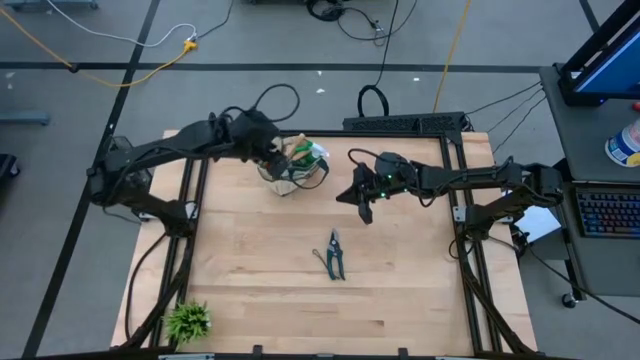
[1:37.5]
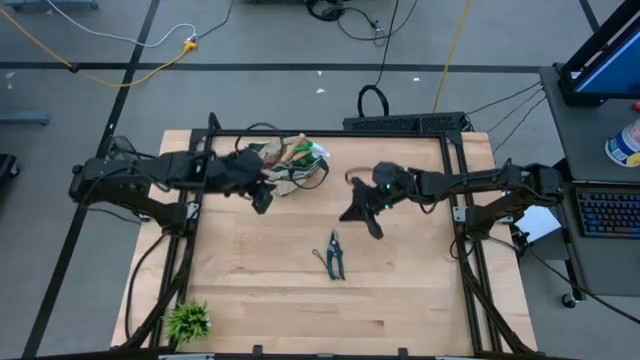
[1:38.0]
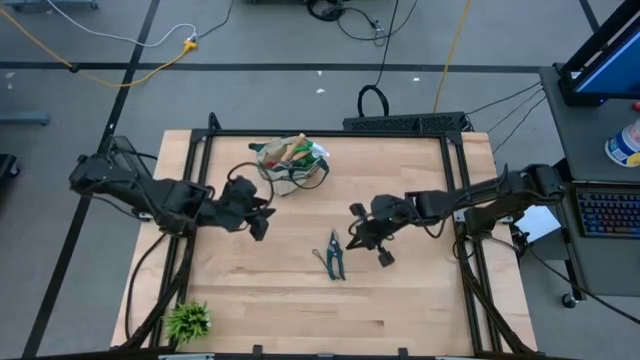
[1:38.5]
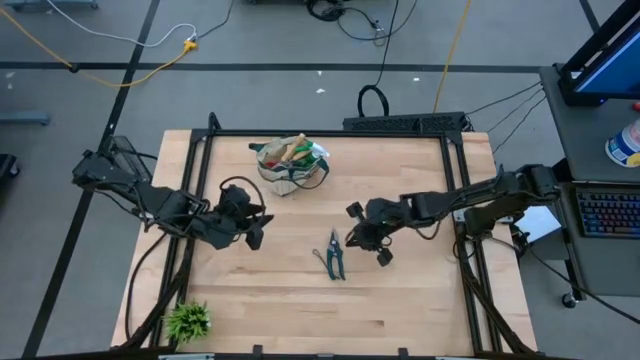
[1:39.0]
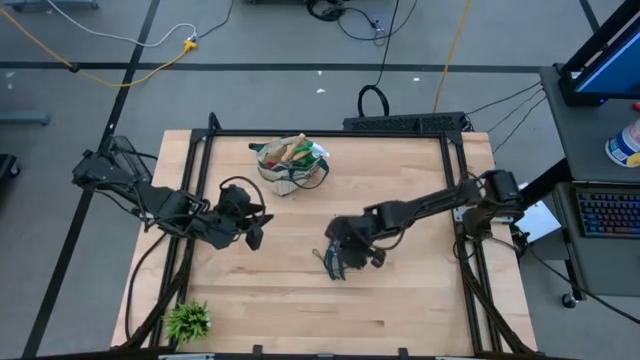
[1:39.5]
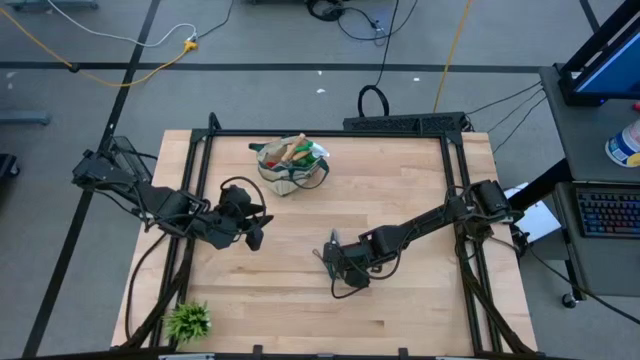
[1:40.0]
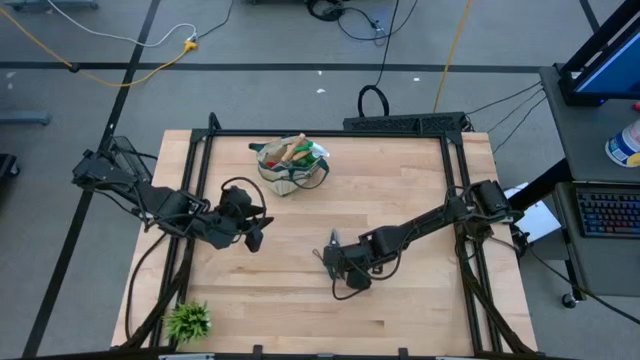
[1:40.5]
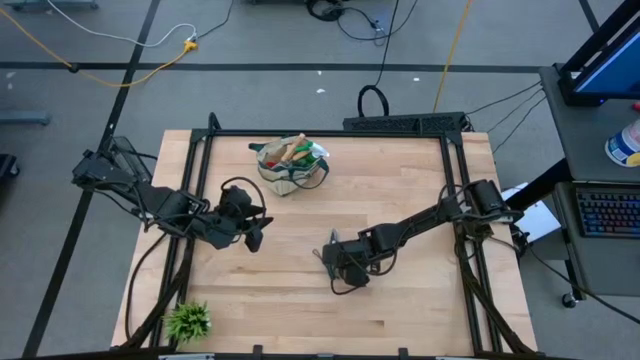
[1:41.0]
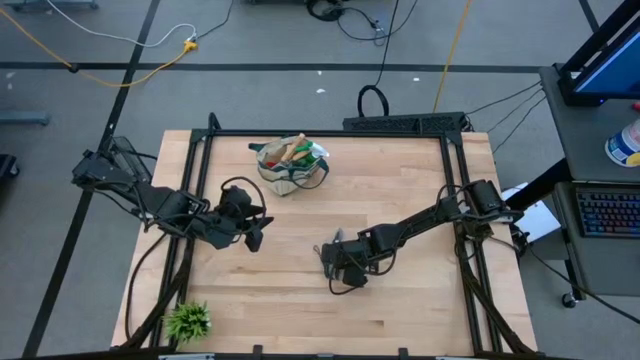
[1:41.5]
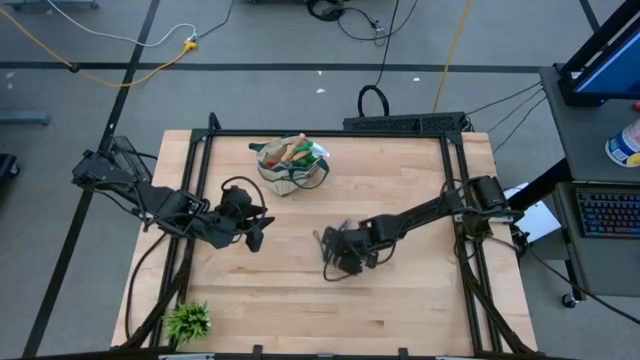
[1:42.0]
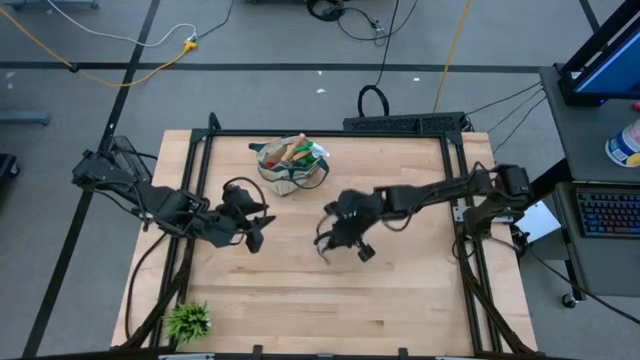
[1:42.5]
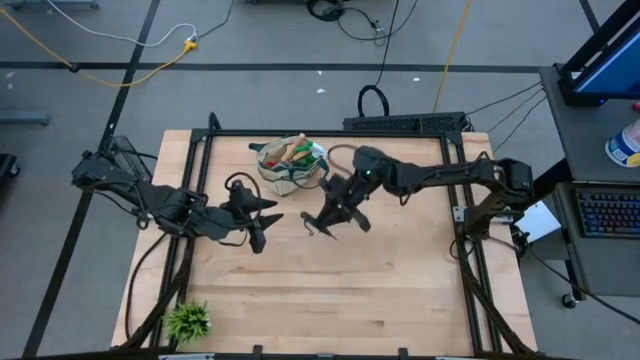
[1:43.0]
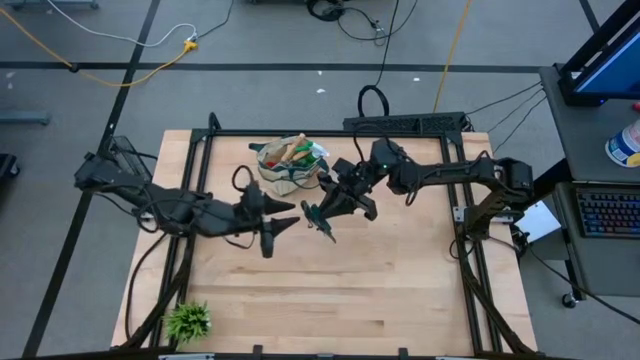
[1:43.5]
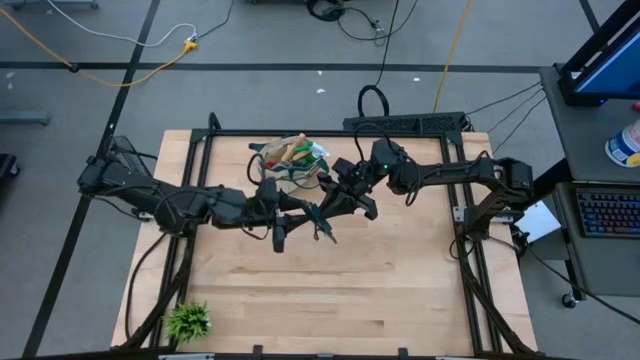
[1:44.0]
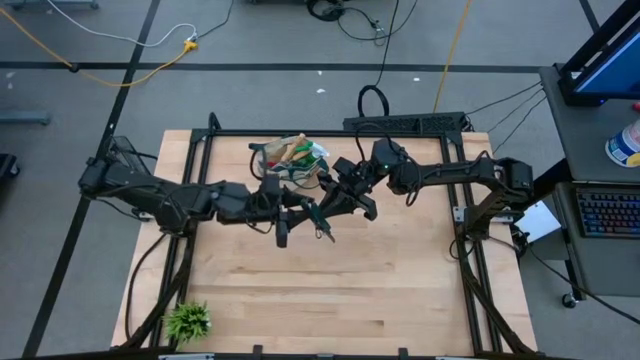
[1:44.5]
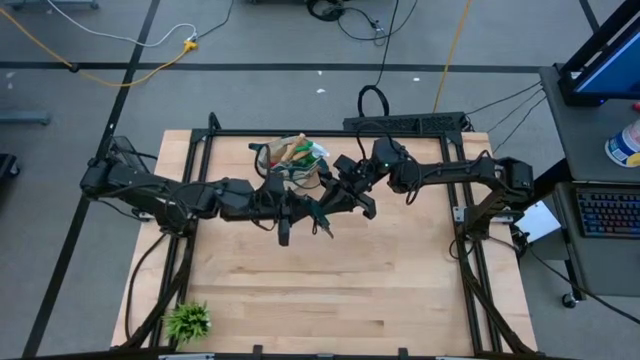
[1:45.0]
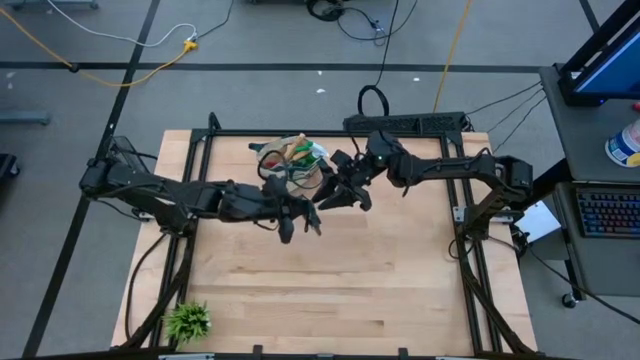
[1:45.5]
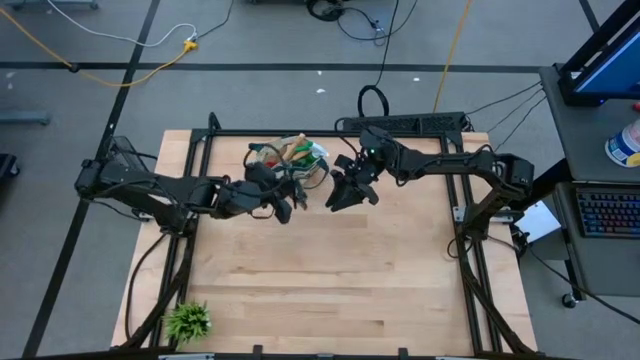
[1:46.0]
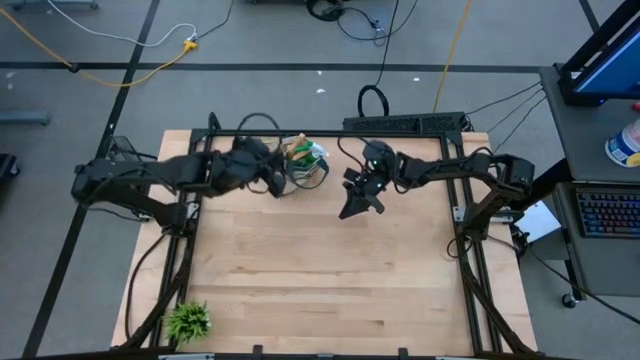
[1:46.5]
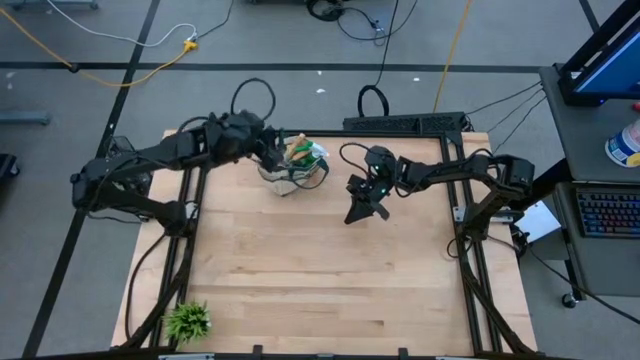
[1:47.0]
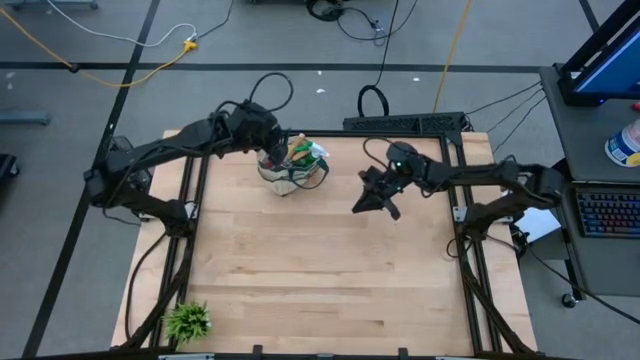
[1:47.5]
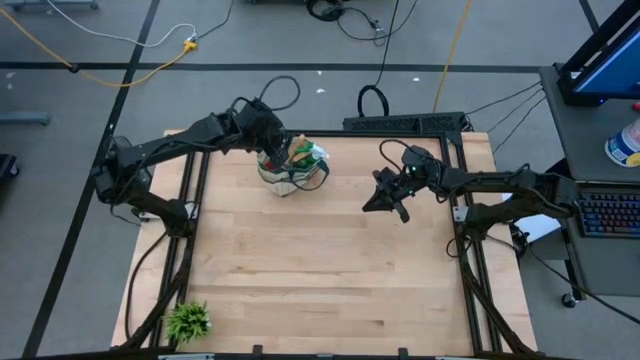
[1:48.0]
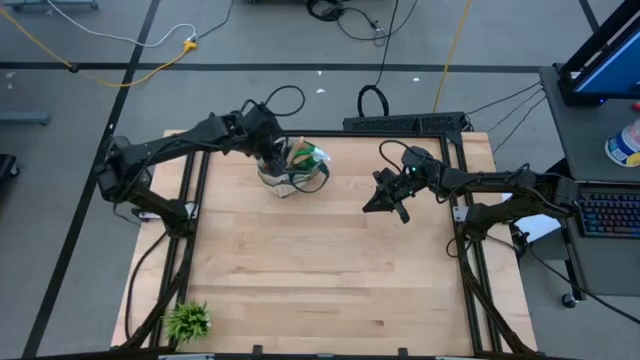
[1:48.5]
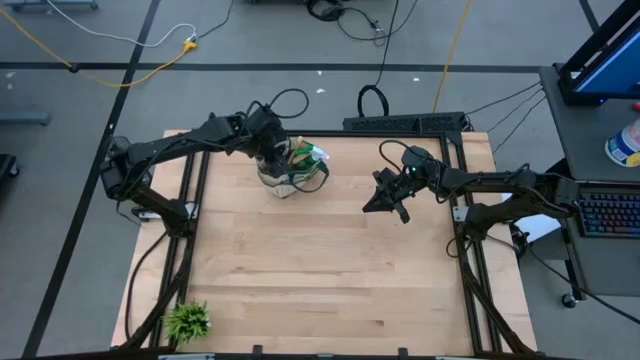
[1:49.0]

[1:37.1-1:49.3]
Task: Pick & Place Garden tools in Gardening bag
Put the shear scissors into the gardening bag

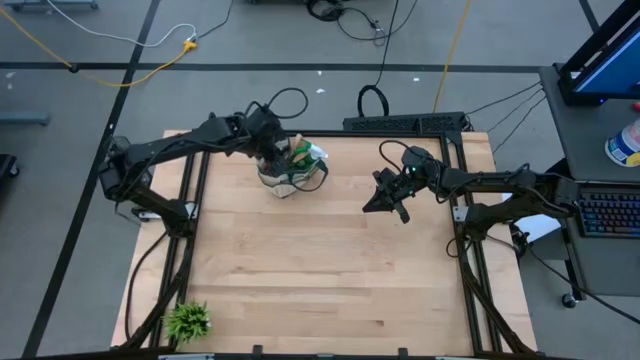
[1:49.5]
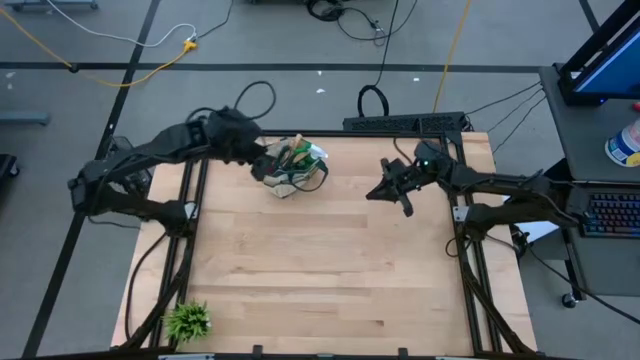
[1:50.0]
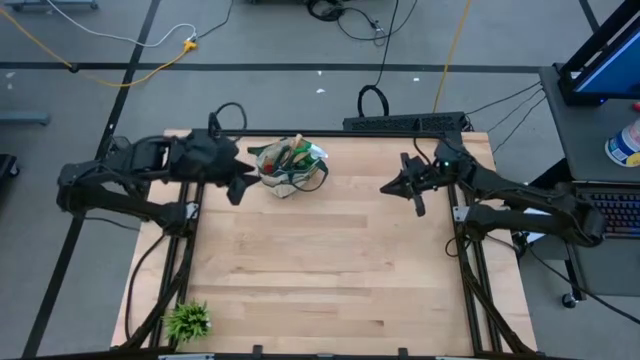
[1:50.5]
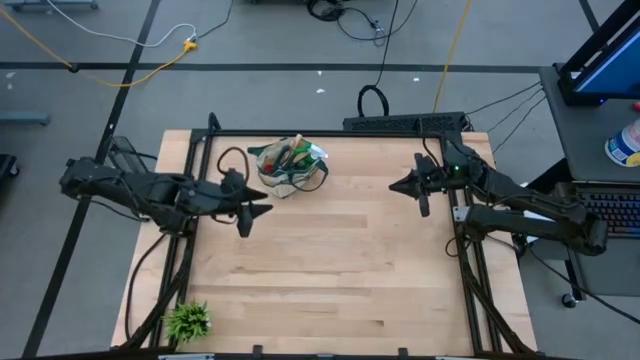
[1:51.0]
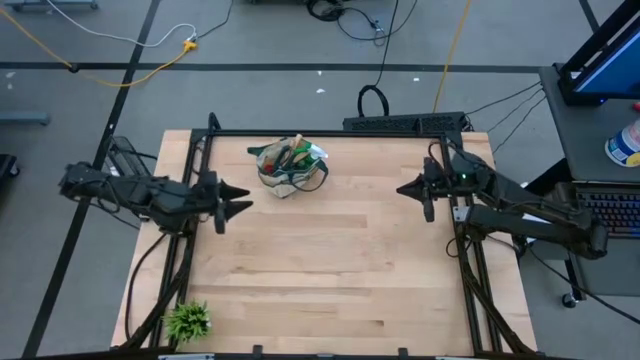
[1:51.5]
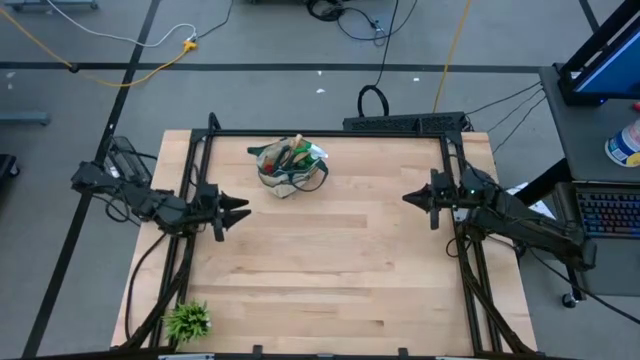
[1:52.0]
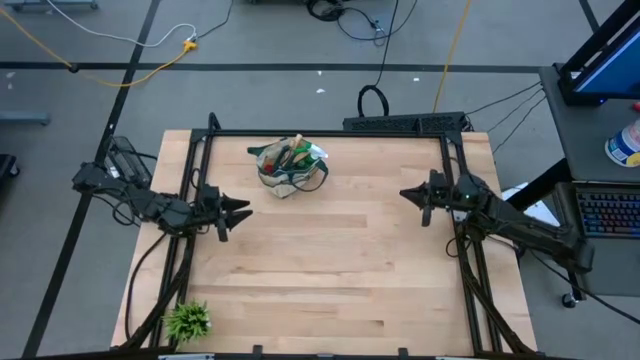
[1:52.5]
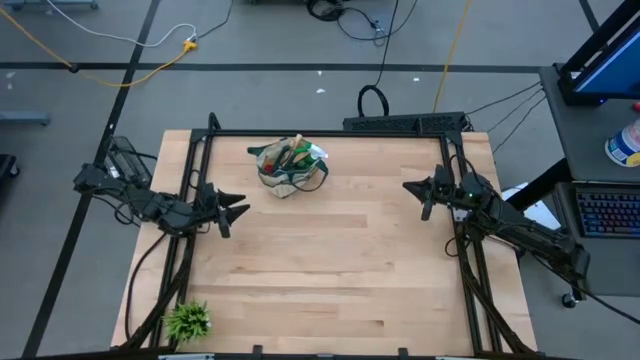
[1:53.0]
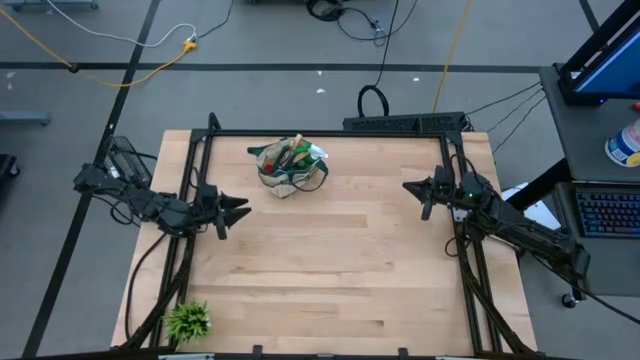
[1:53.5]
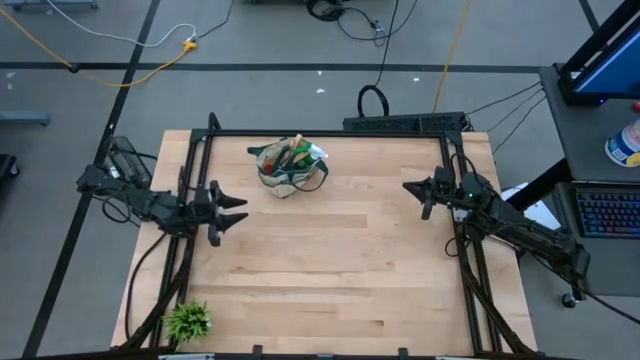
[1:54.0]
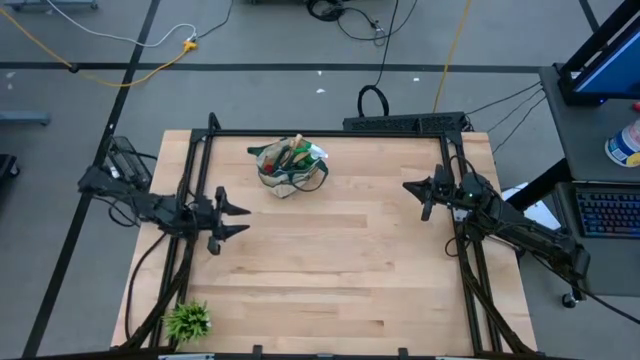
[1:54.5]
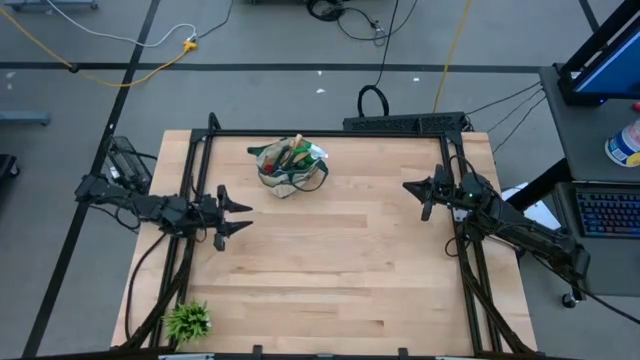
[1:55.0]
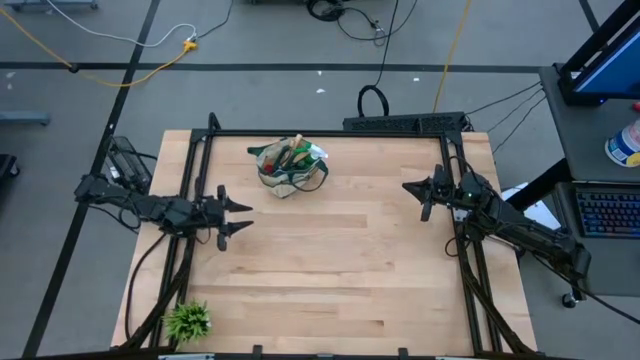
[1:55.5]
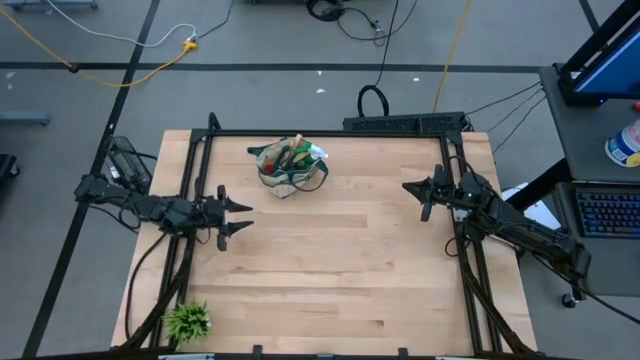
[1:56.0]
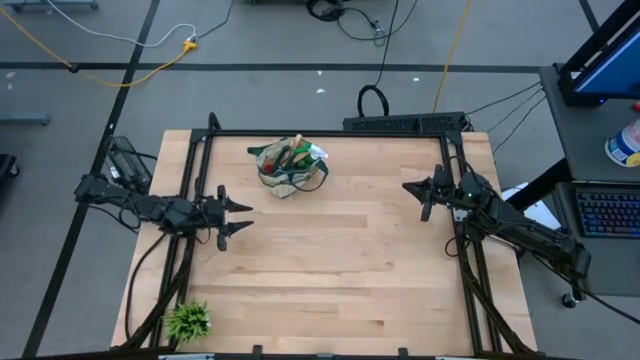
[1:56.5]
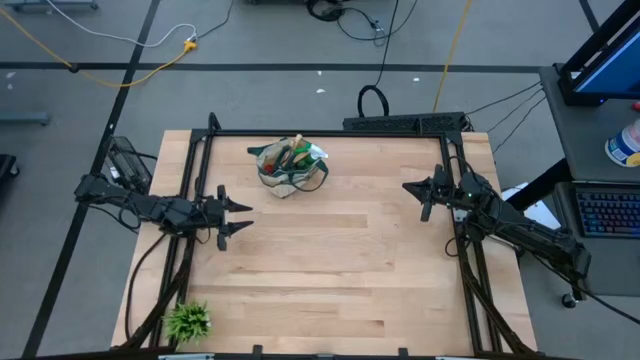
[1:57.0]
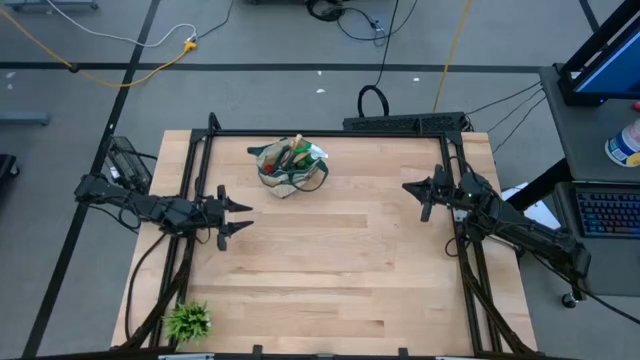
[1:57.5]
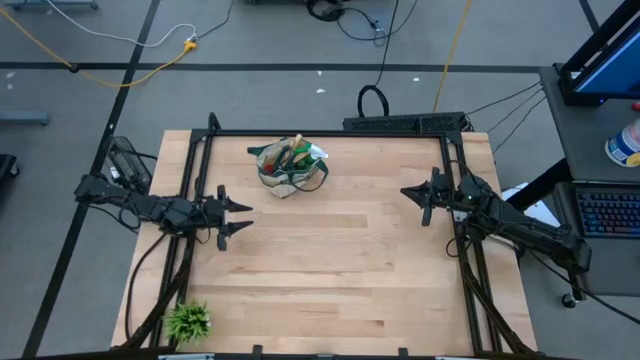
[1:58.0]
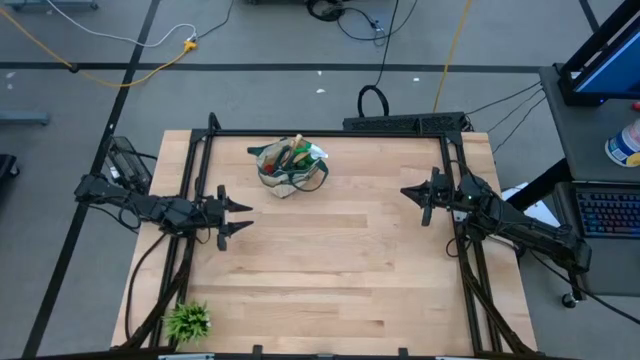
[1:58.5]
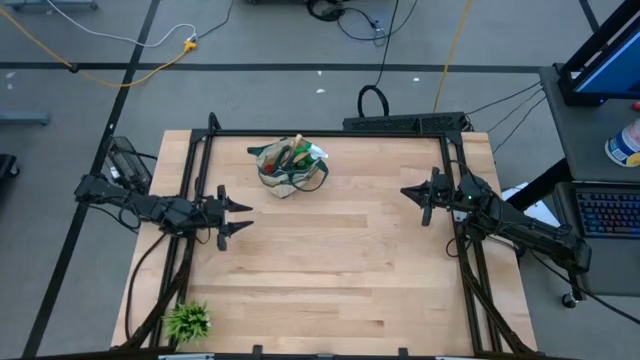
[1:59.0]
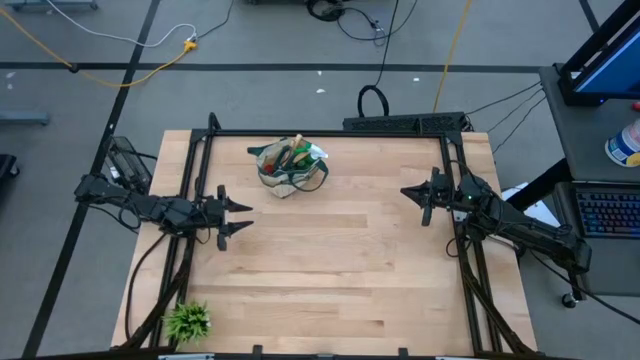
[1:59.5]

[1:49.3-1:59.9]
Return to Home Position
